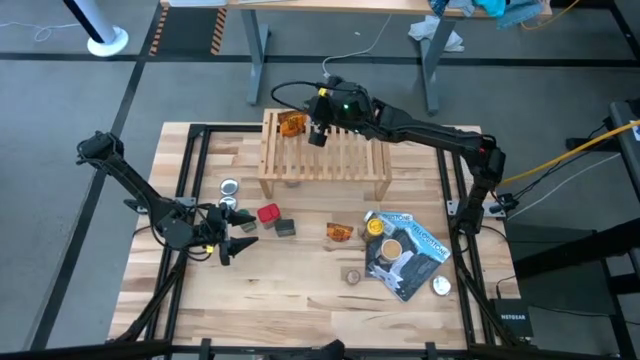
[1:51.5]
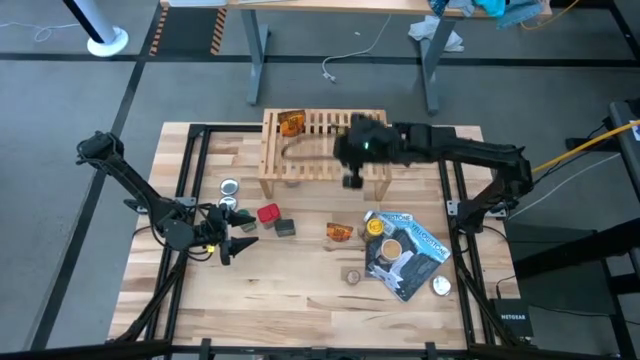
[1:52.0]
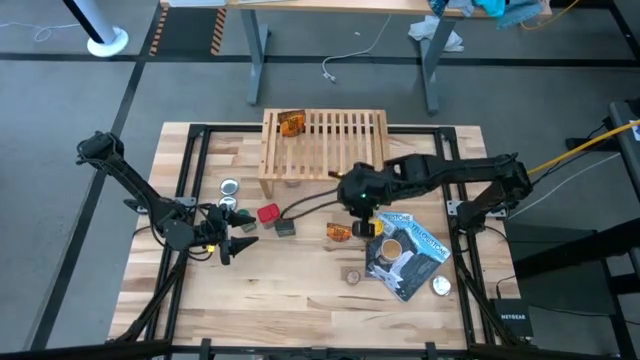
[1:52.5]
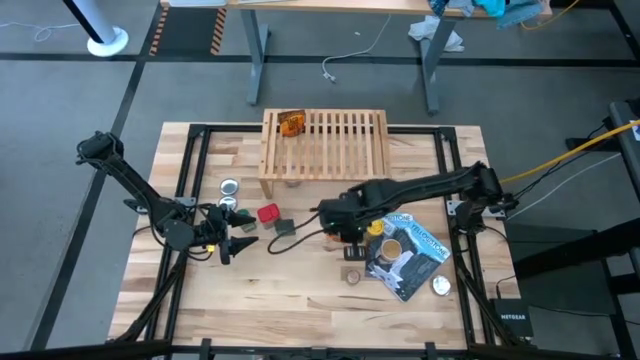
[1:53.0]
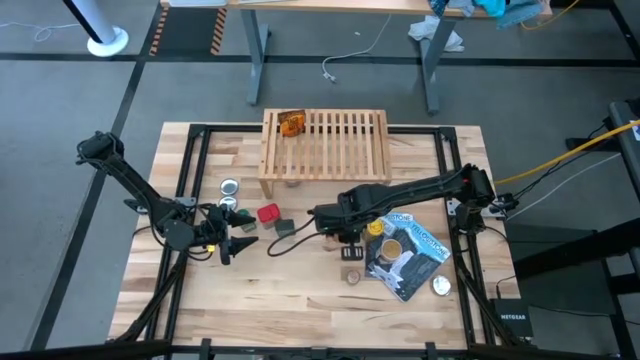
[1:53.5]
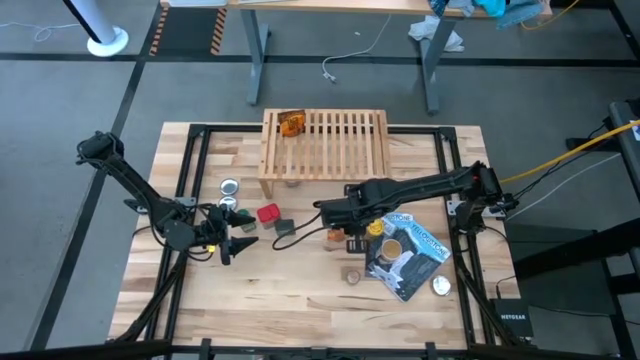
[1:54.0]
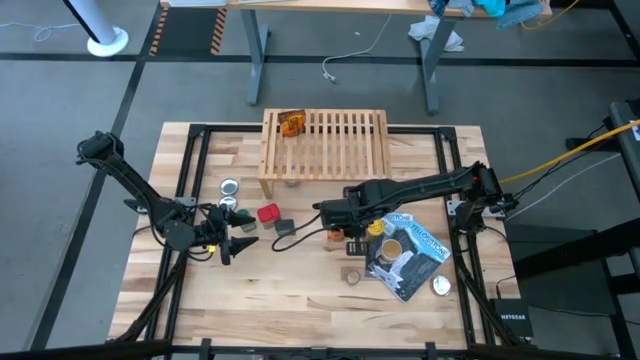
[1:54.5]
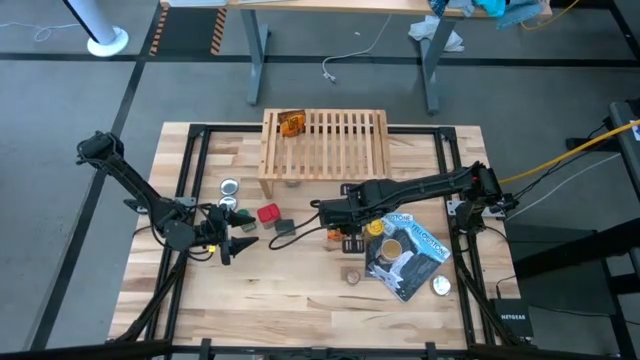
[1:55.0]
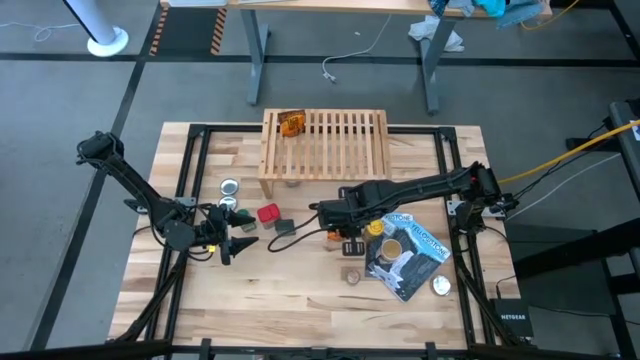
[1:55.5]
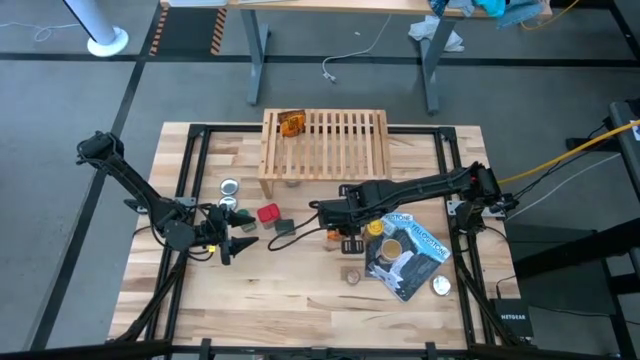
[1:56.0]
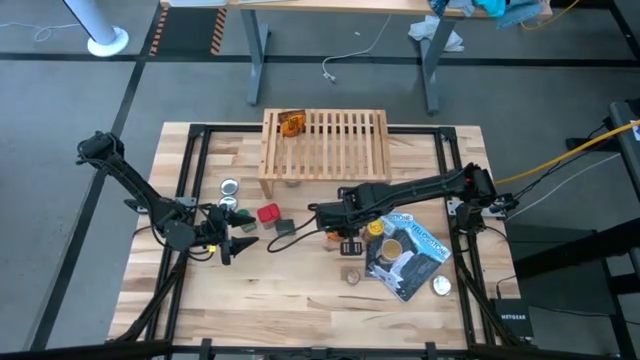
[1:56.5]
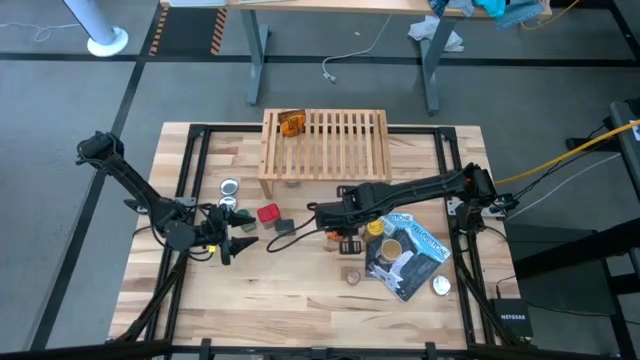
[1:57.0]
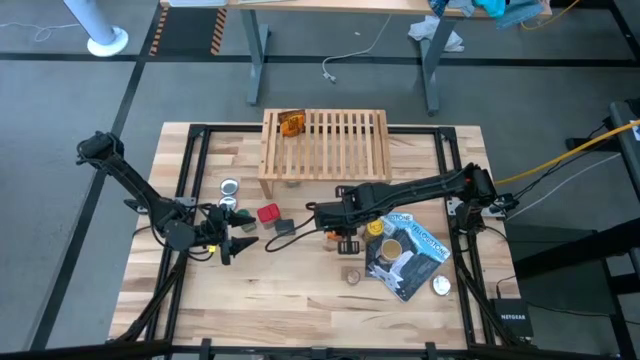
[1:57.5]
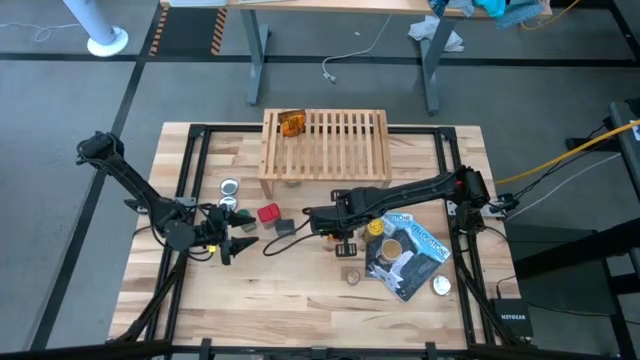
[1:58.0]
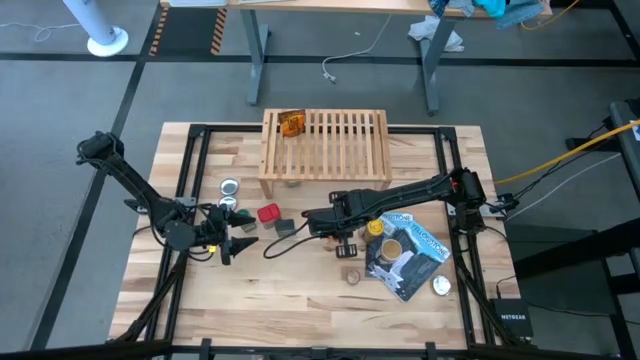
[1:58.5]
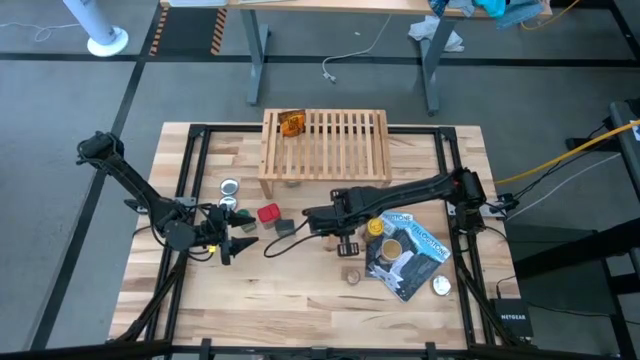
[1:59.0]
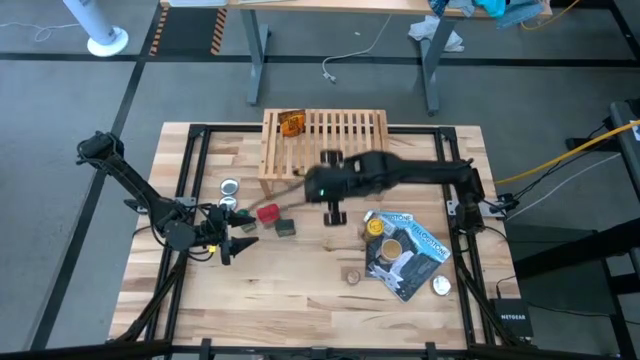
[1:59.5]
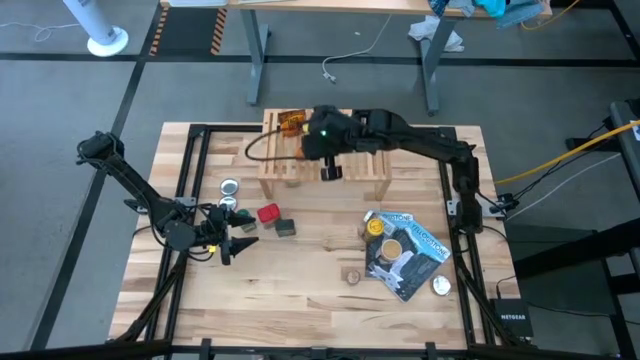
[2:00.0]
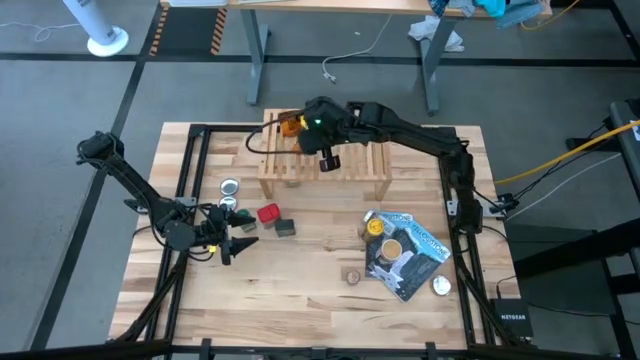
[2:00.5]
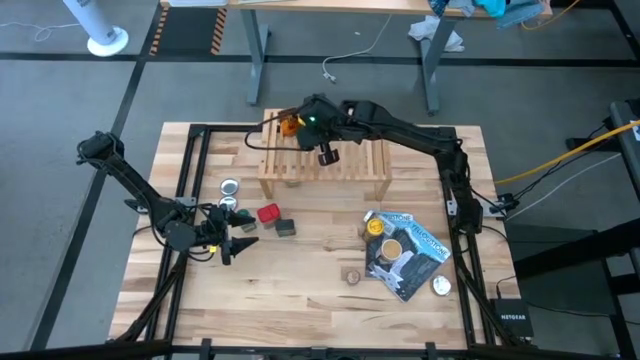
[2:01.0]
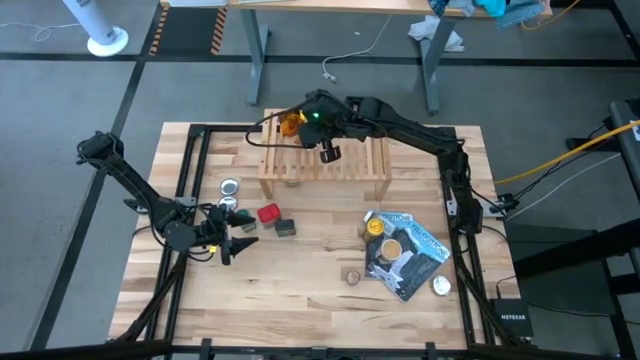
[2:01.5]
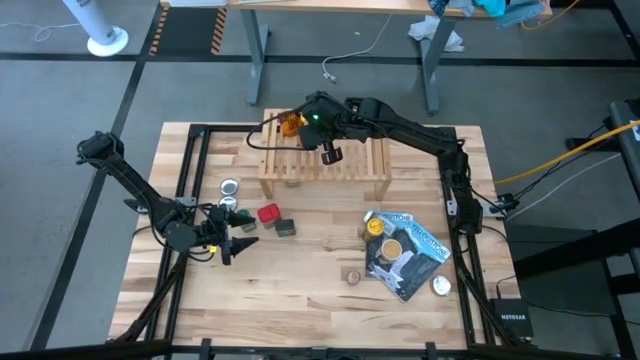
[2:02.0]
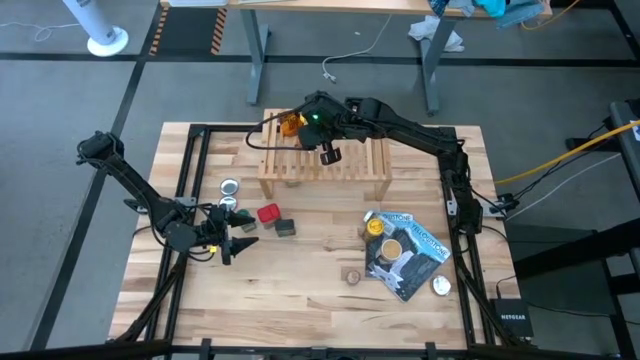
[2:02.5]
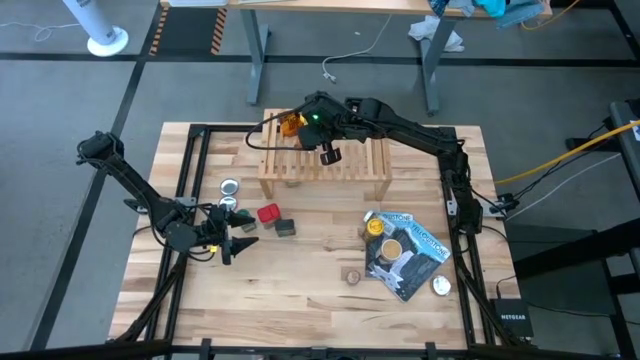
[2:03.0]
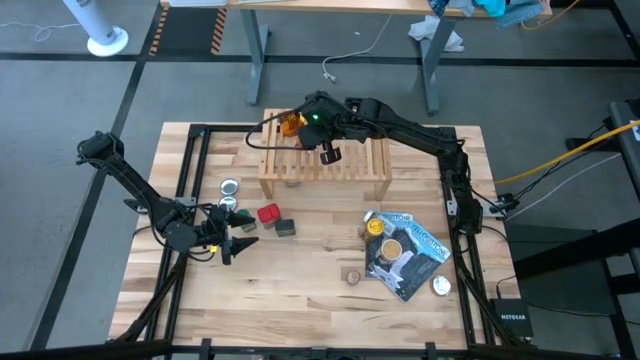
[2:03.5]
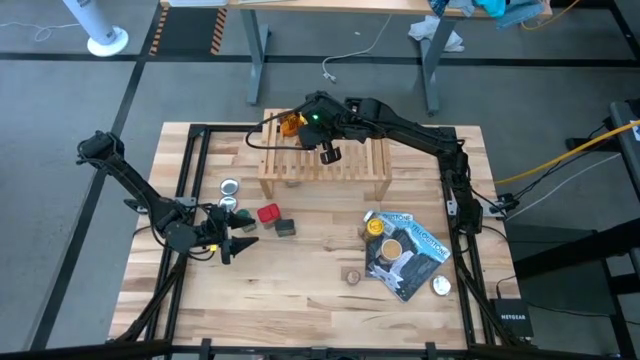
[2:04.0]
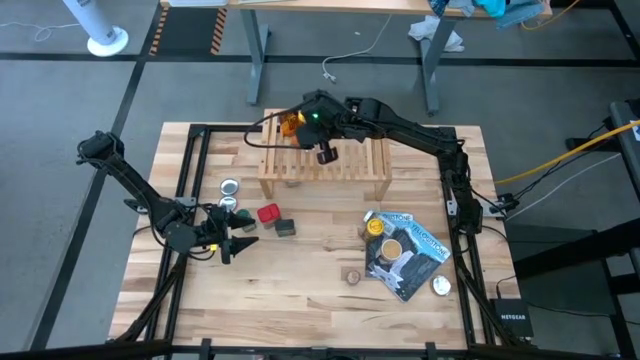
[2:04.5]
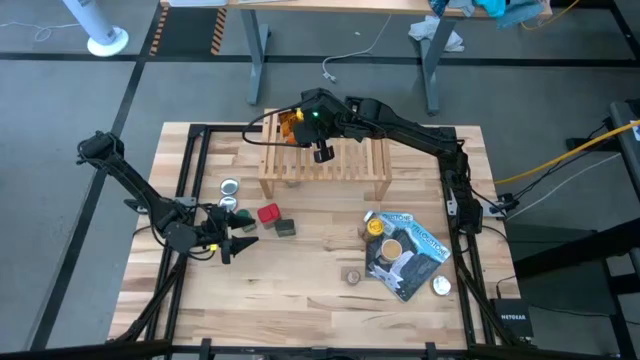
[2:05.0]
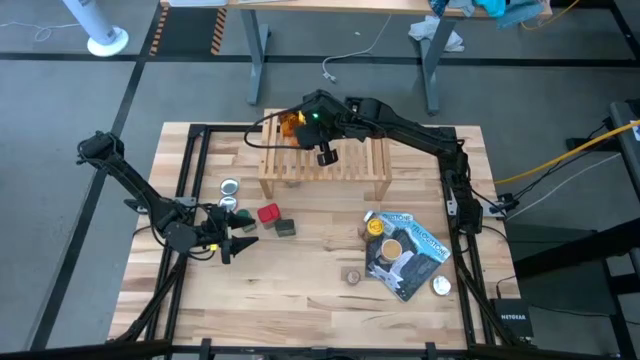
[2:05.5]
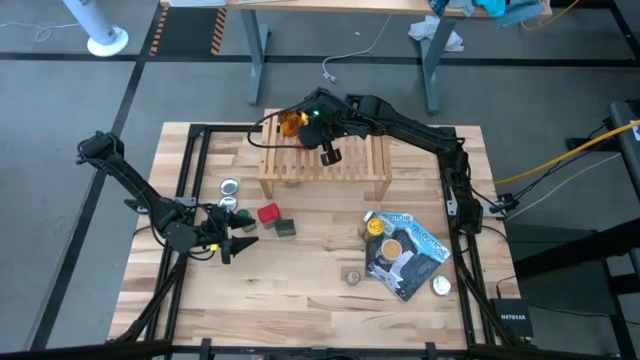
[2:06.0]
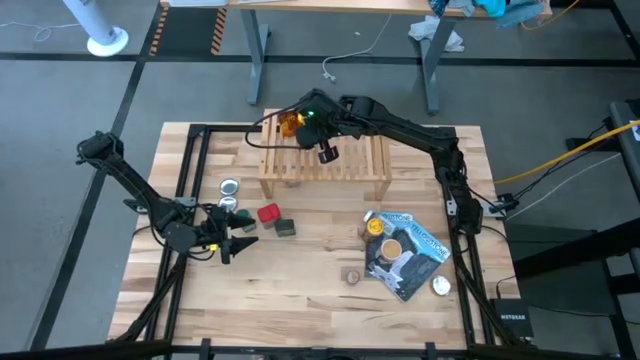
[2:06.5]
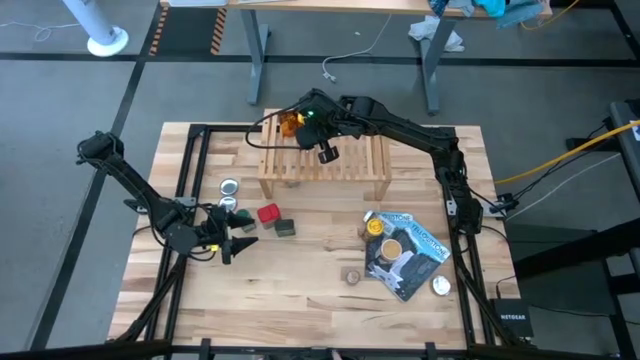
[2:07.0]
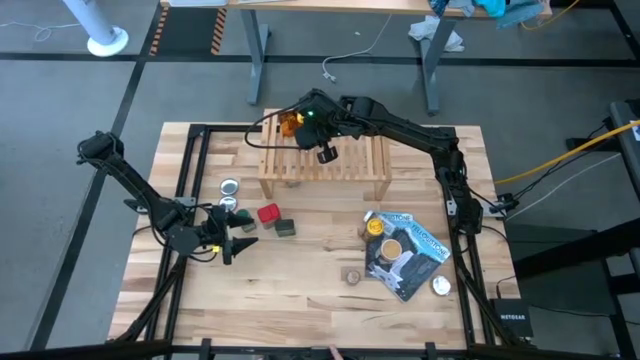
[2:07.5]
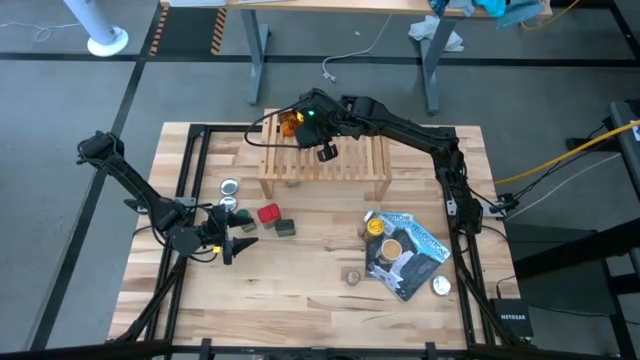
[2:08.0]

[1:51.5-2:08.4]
Task: Shelf spices
Put the orange seasoning pack on the shelf

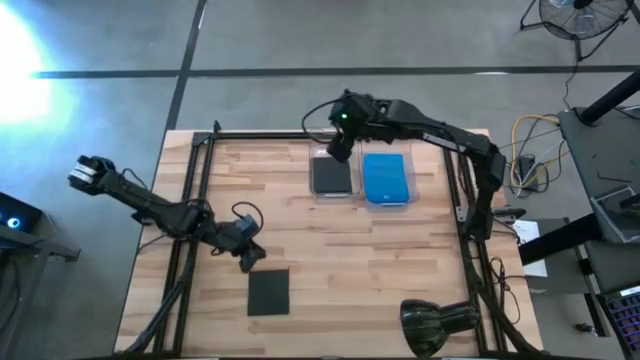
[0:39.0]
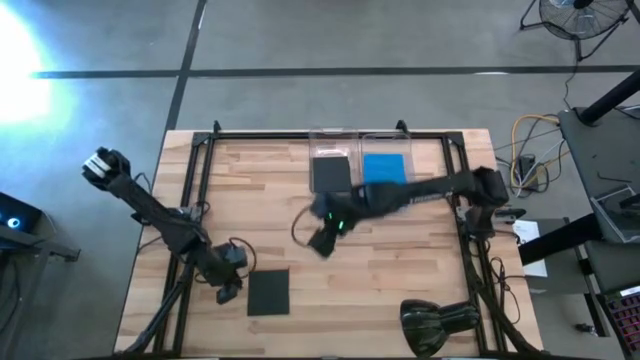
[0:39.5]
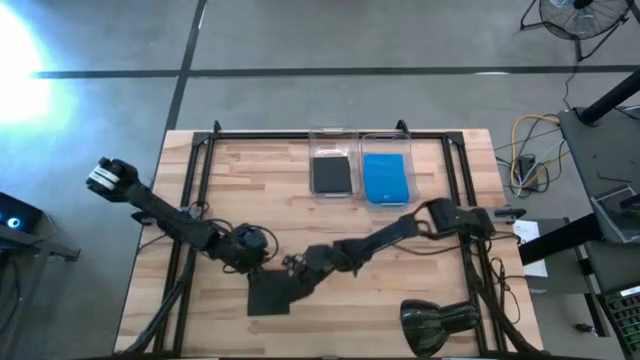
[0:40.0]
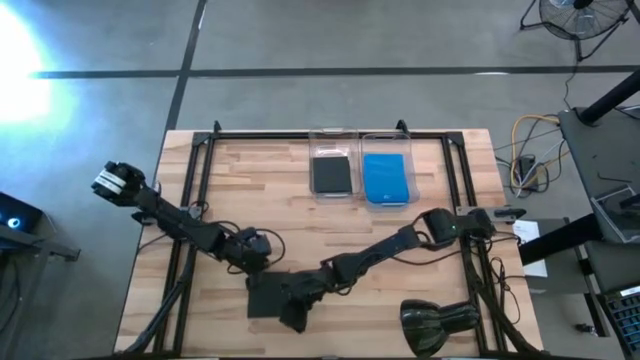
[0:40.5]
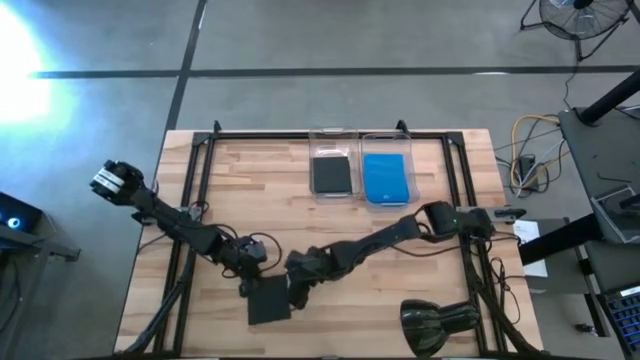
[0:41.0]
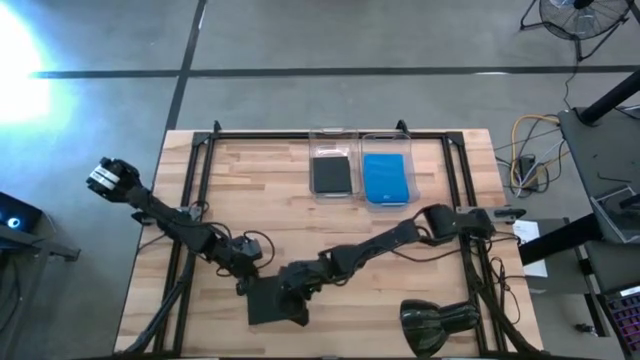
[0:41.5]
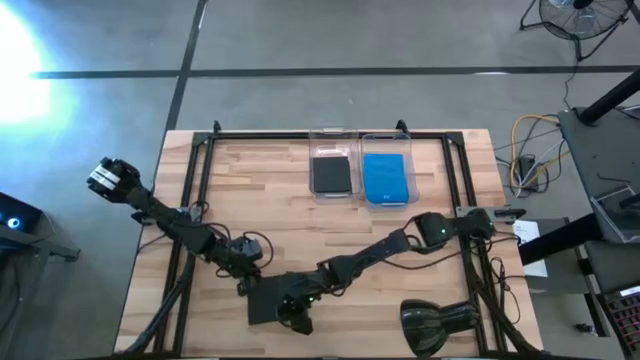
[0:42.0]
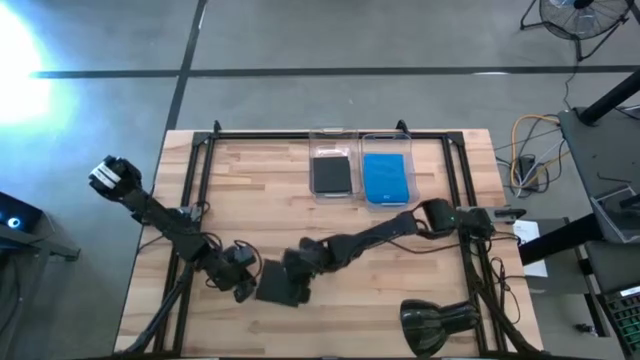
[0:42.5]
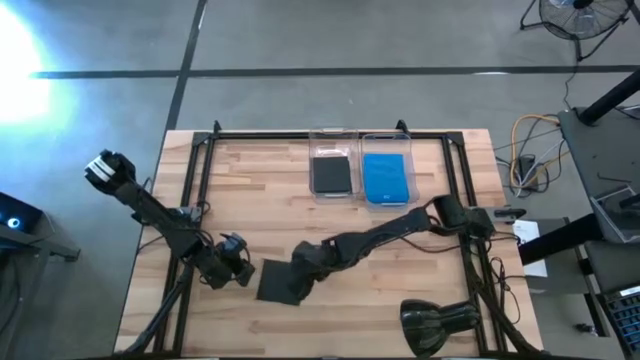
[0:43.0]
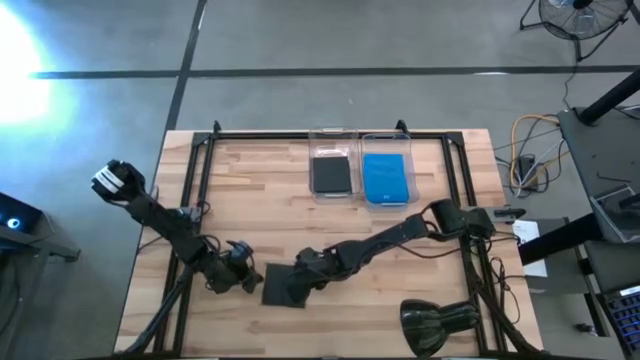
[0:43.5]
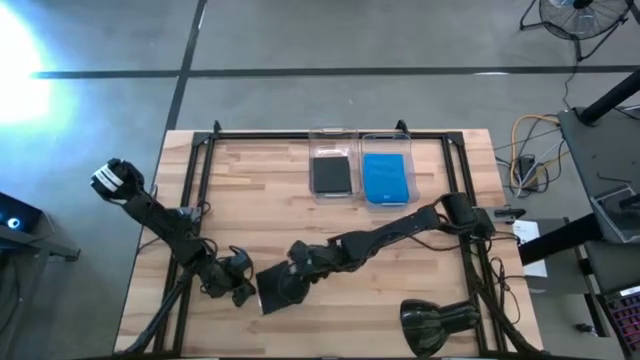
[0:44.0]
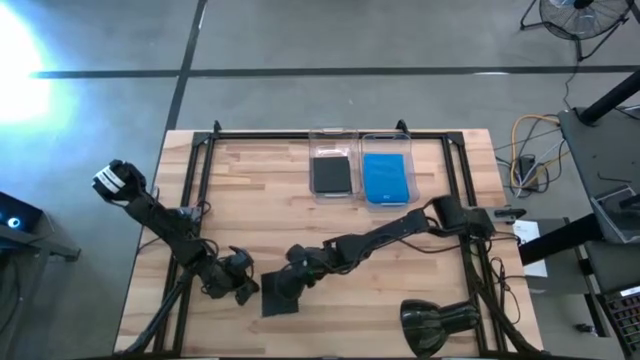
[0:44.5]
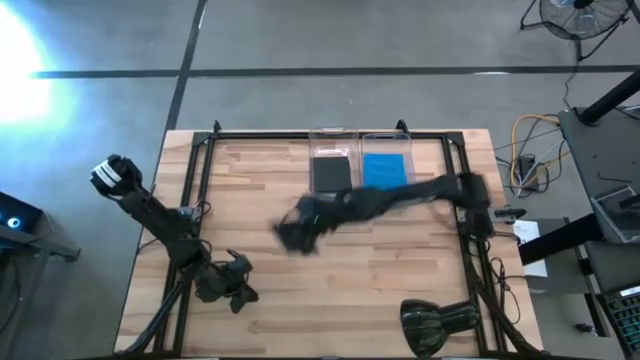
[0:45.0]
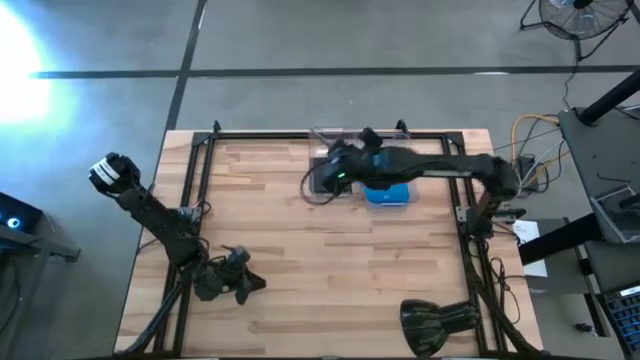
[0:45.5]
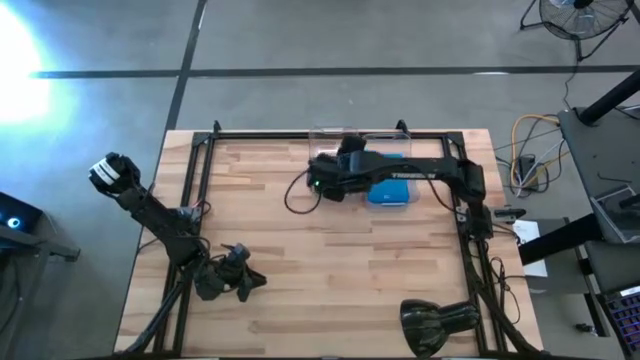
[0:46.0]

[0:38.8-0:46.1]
Task: Pick & place jewel cases by type
Put the black CD case into the left transparent bin
